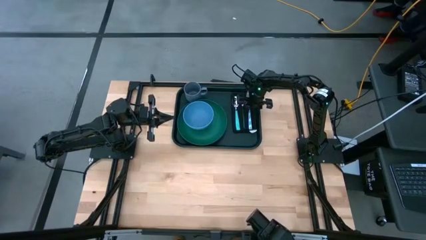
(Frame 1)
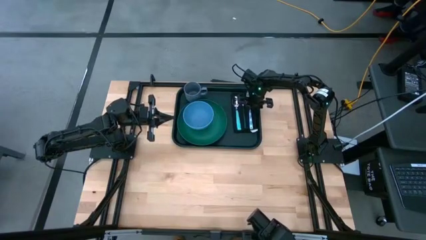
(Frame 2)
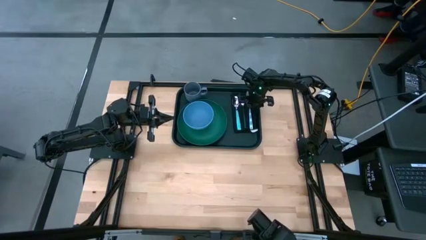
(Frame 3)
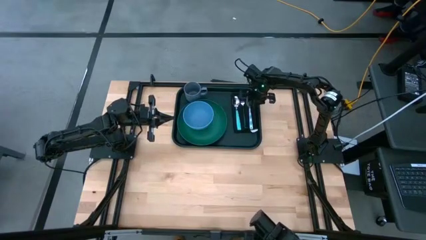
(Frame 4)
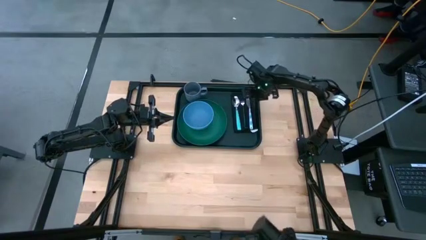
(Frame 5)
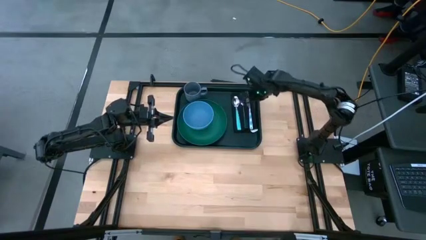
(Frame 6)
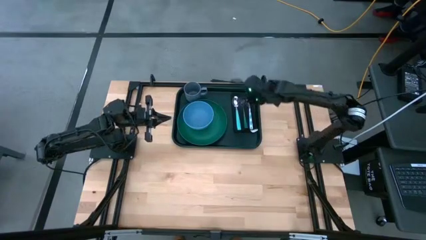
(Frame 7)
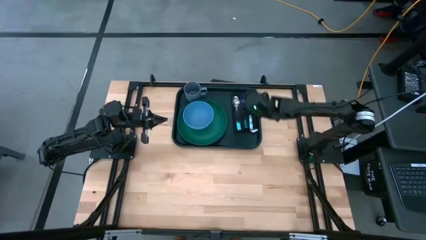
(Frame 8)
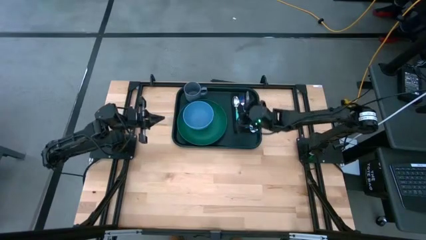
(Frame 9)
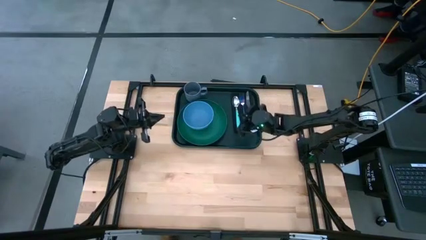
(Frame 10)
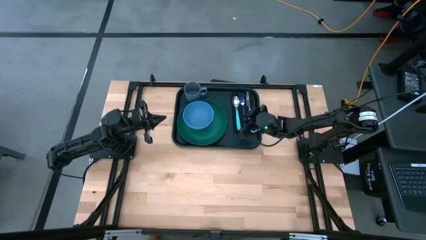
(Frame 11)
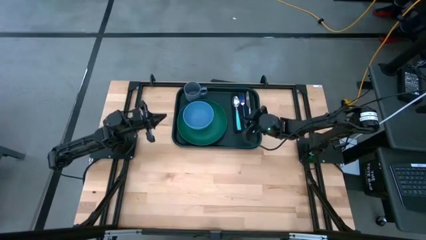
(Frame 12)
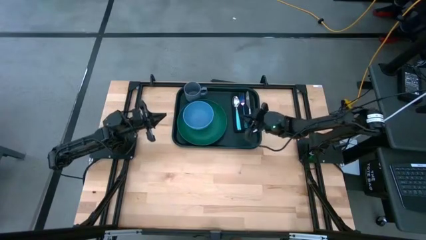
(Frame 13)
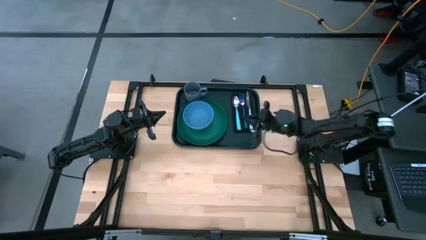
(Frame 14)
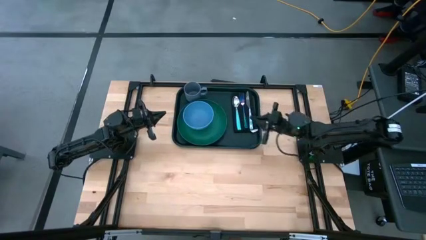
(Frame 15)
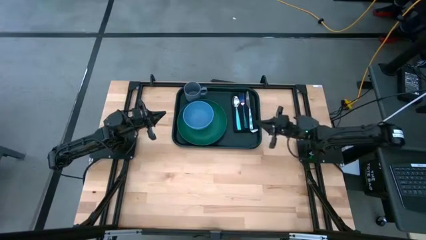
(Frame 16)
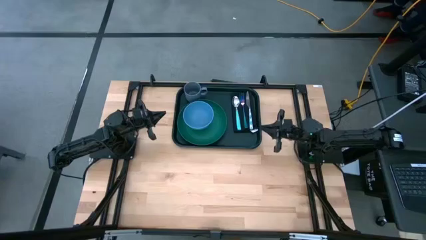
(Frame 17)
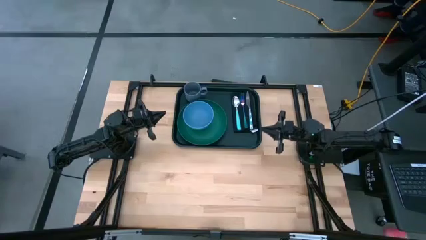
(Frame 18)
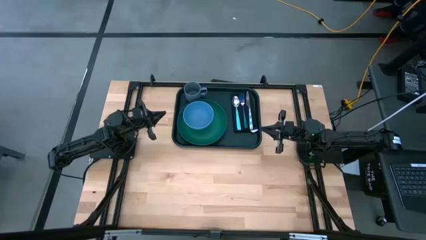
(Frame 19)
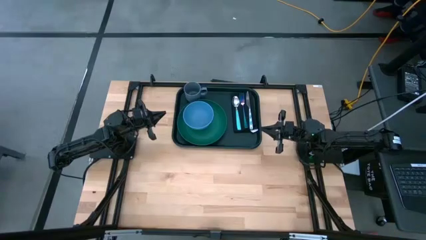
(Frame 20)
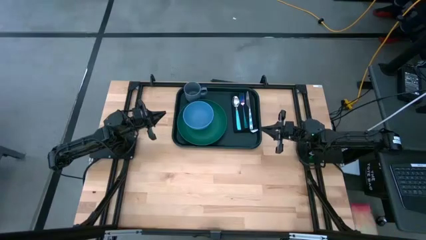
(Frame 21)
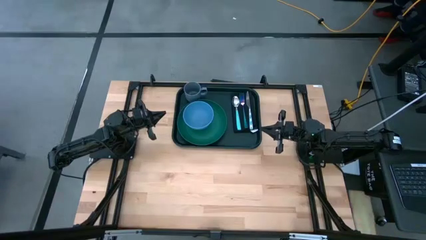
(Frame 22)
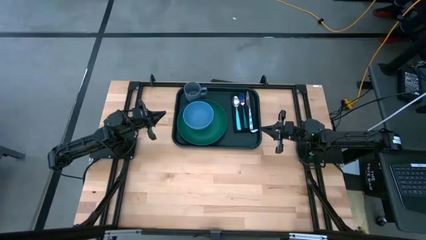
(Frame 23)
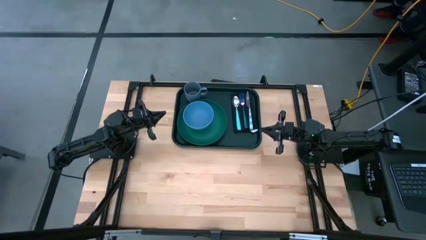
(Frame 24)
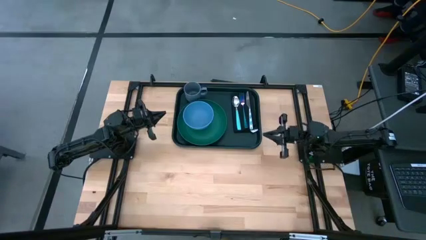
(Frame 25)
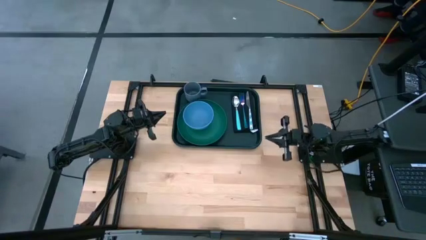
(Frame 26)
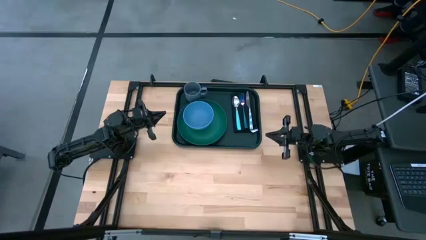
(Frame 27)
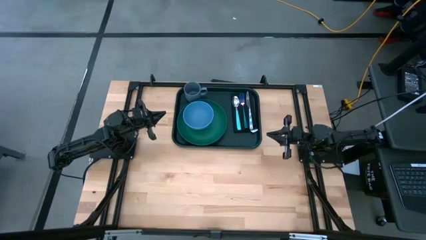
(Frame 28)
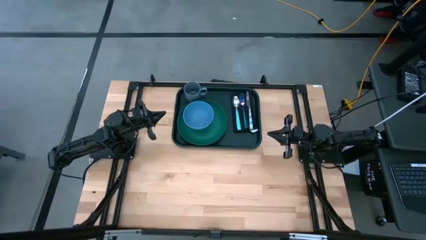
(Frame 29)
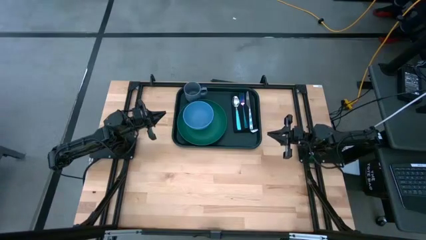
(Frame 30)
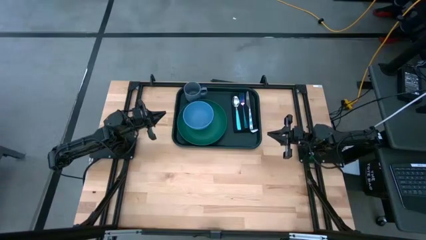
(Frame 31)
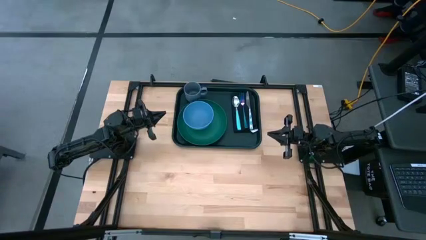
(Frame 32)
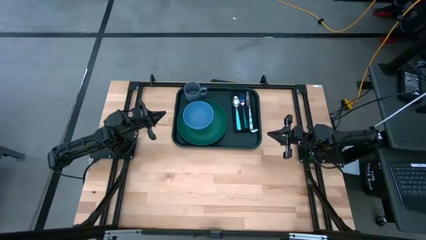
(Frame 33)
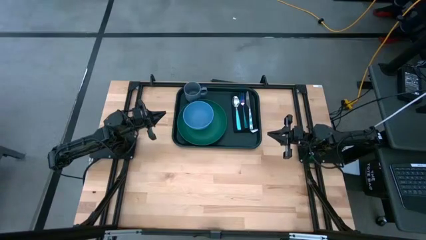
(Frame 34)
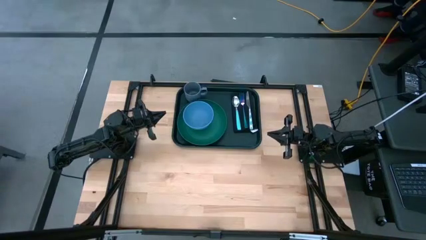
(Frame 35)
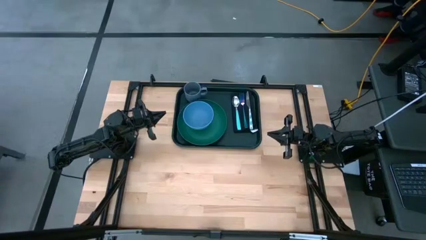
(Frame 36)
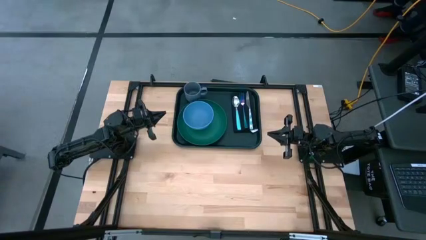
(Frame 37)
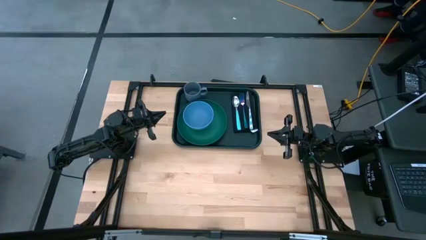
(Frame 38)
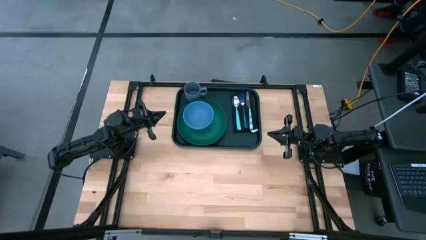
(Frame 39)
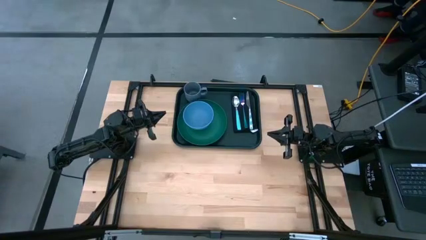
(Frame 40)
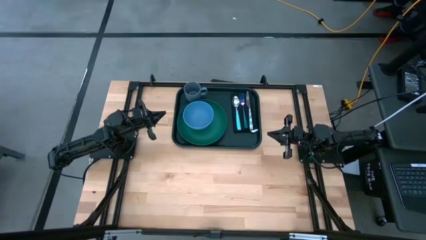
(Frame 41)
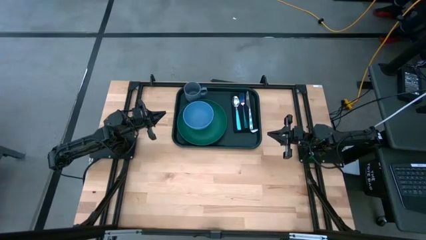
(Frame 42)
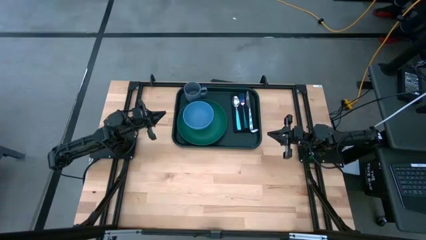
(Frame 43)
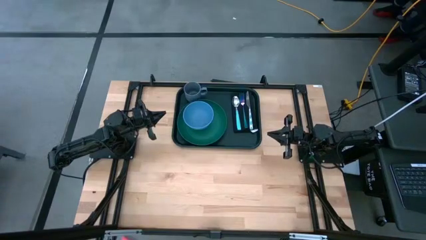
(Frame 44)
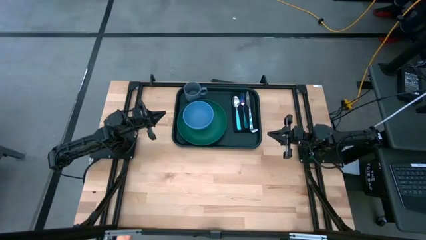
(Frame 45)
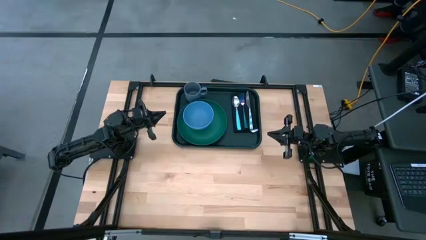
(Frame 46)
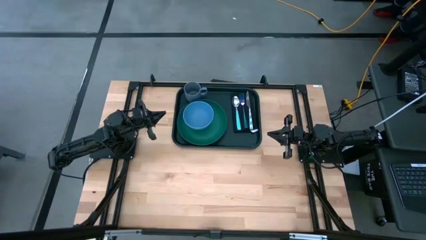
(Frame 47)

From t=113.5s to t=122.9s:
Task: Set up tray
Return to Home Position

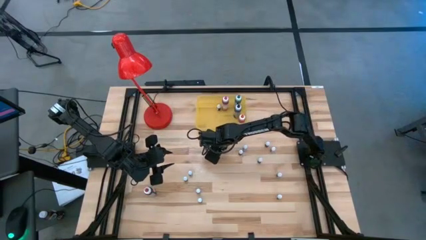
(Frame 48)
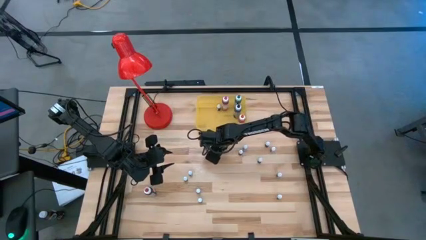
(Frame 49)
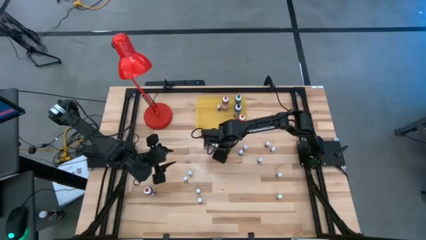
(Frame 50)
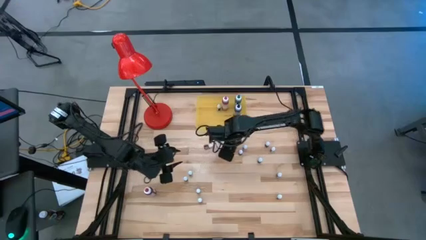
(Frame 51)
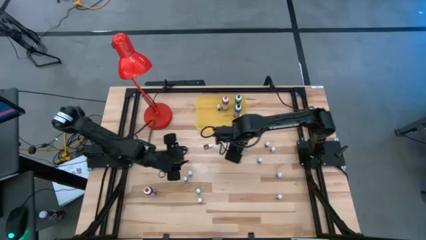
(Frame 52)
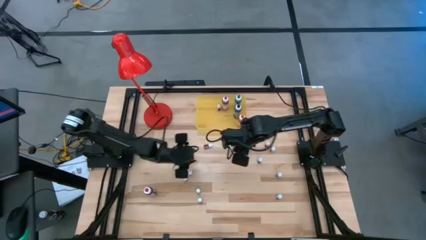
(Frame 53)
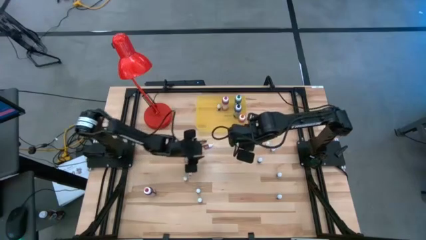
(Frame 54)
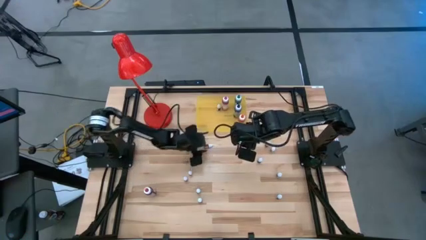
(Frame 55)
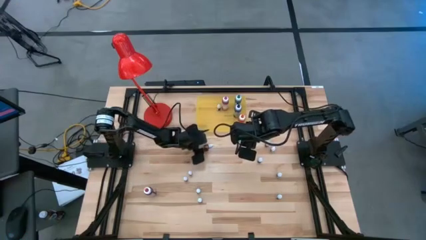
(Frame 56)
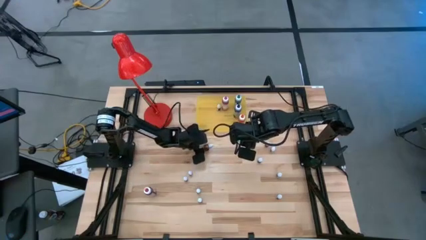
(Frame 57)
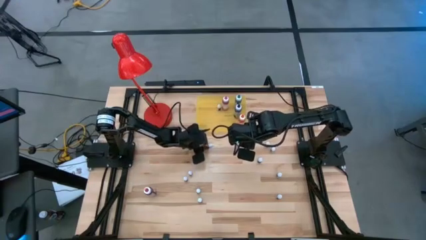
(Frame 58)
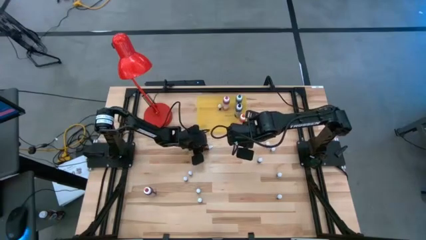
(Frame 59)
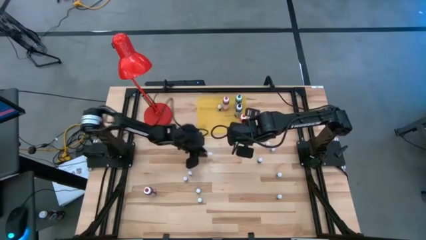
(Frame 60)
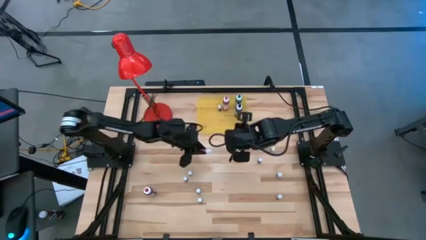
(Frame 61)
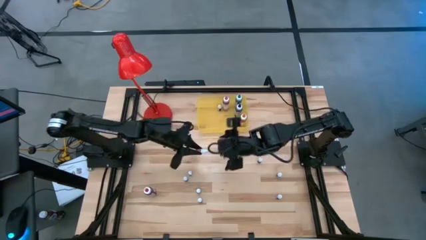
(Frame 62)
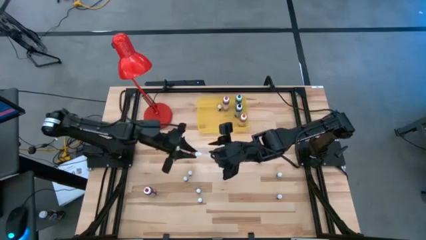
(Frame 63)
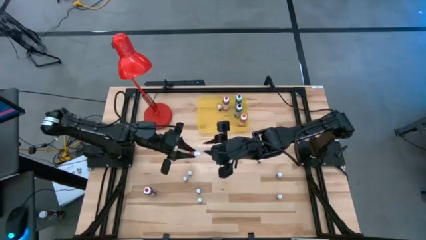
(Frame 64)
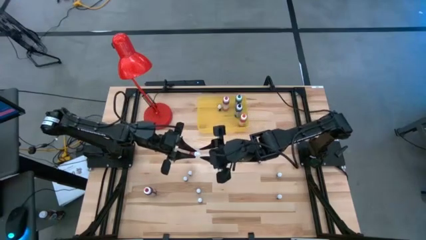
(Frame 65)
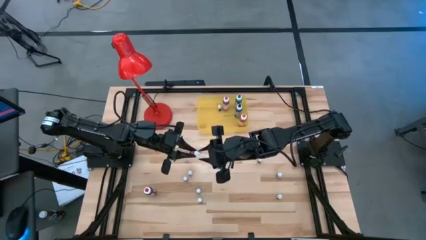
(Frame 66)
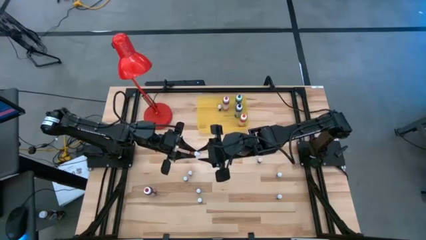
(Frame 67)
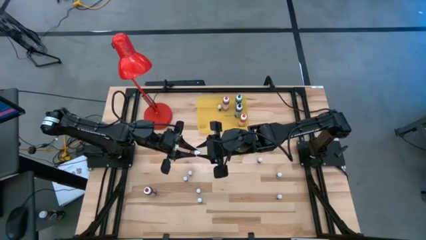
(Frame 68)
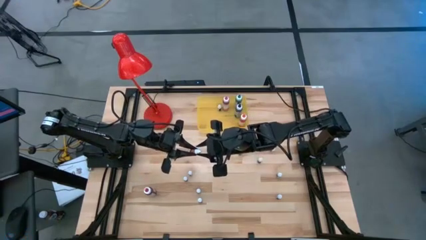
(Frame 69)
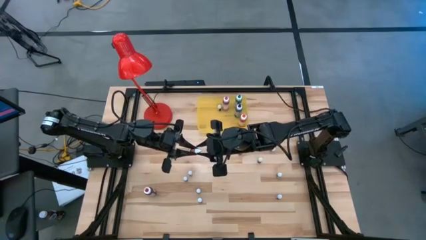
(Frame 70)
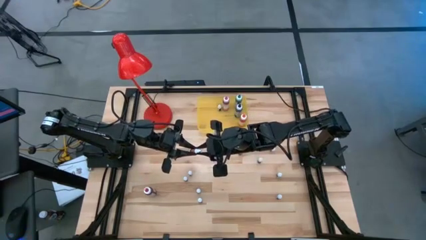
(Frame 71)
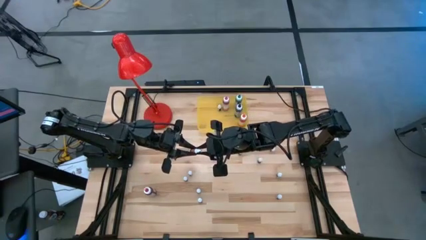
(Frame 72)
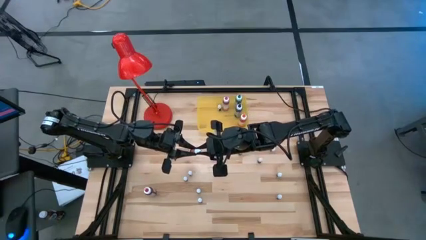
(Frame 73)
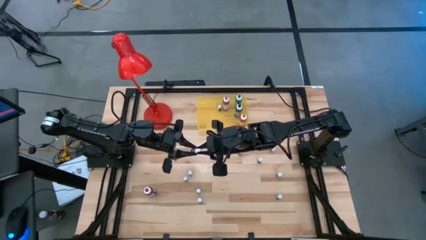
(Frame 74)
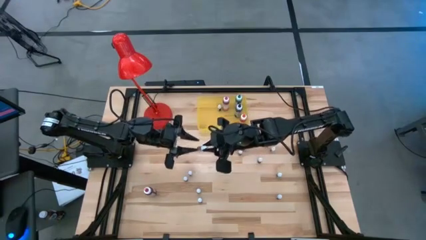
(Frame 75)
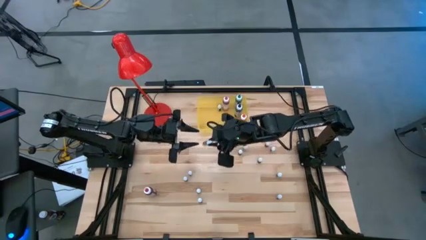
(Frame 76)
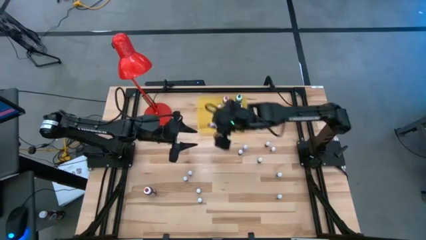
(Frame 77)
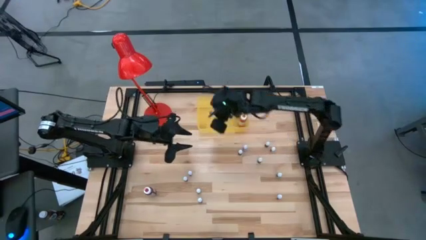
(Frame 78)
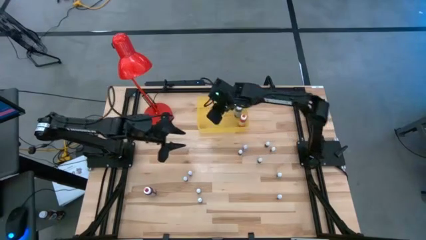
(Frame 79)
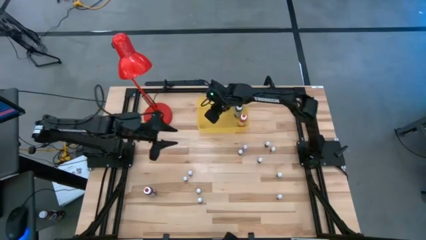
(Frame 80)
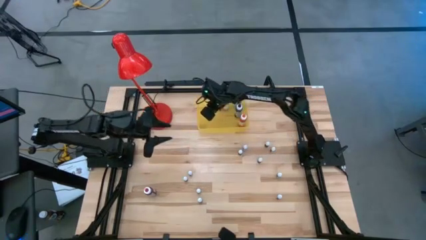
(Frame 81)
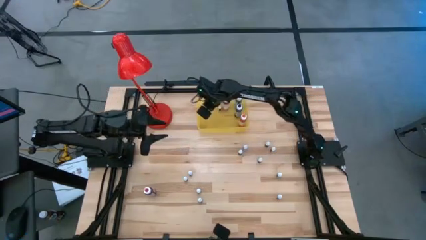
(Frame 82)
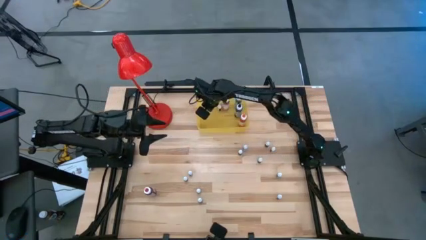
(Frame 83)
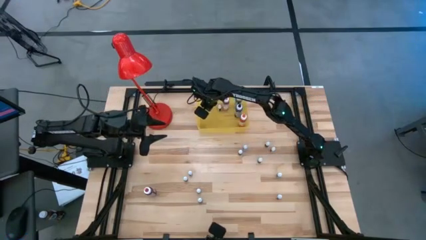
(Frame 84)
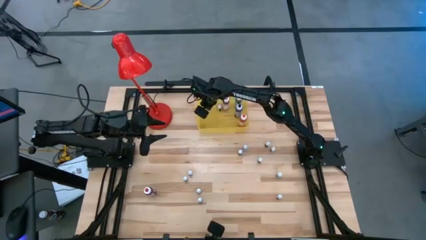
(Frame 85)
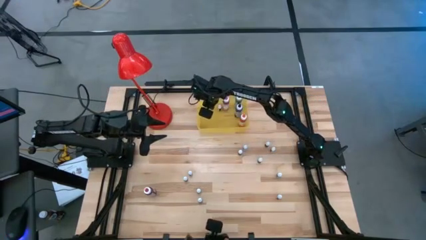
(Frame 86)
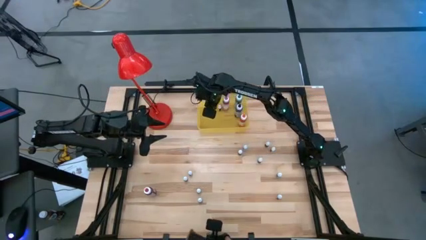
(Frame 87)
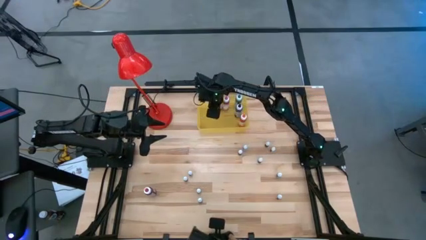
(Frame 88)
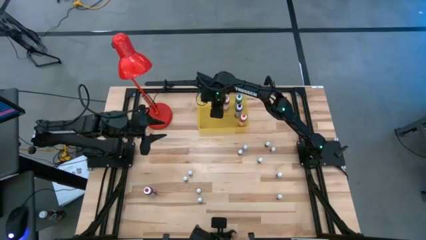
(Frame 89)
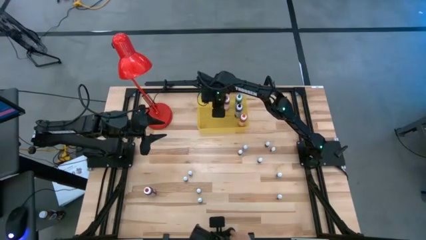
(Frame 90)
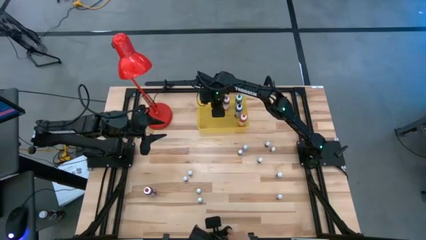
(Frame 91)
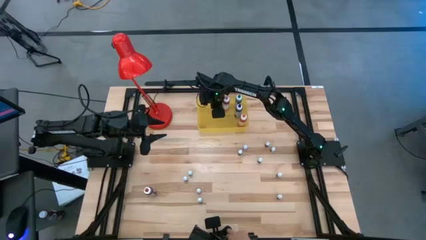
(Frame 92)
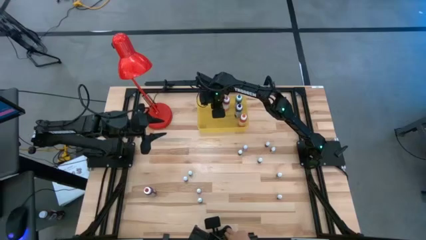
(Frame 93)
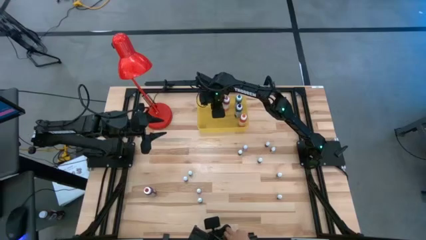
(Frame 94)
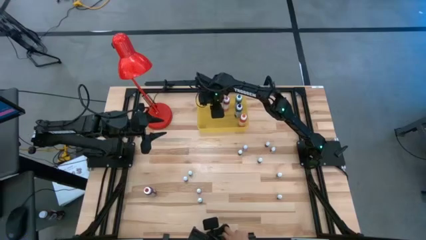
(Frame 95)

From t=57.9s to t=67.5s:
Task: Pick & Place food coloring
Put the small orange food coloring bottle into the yellow bin
